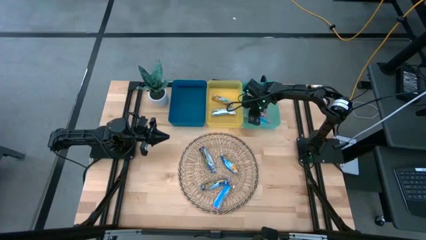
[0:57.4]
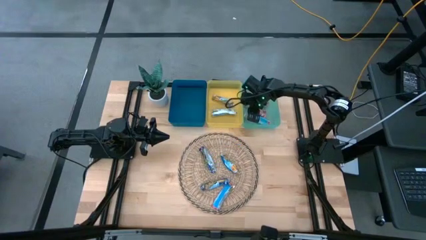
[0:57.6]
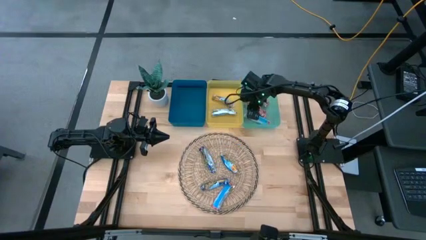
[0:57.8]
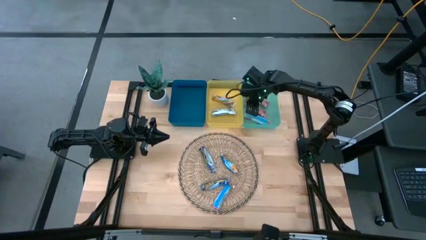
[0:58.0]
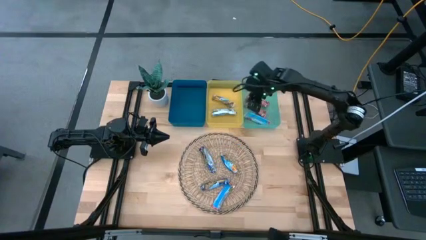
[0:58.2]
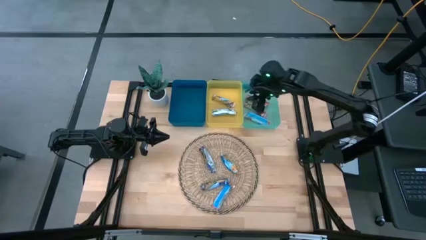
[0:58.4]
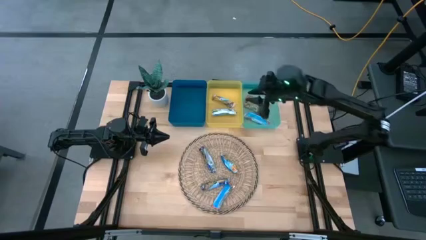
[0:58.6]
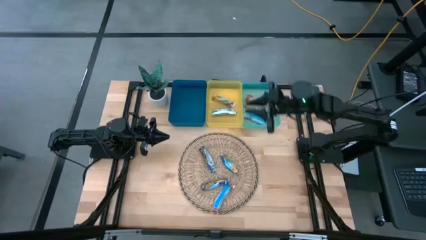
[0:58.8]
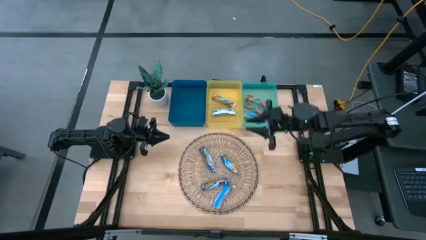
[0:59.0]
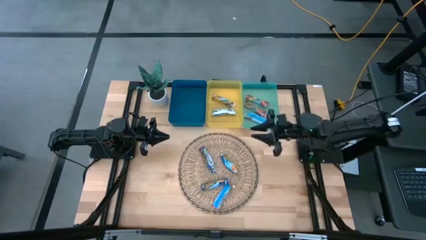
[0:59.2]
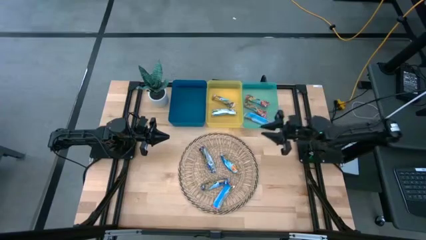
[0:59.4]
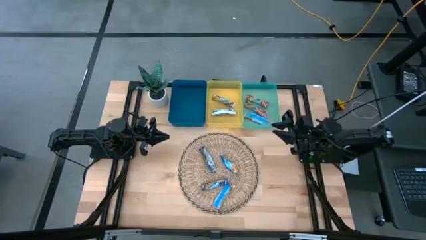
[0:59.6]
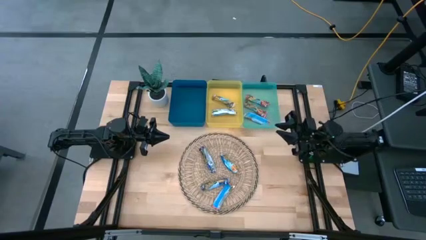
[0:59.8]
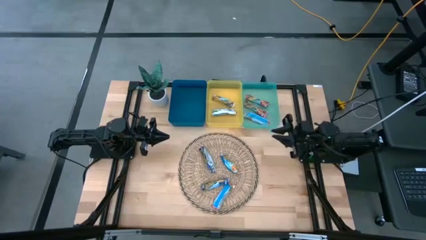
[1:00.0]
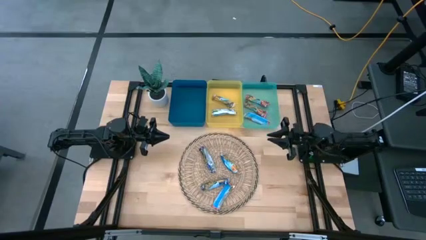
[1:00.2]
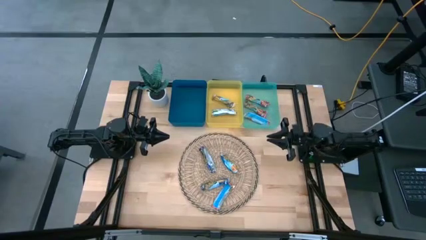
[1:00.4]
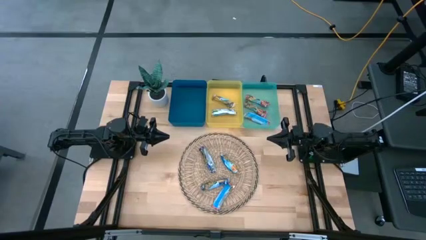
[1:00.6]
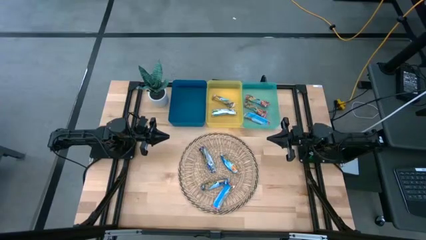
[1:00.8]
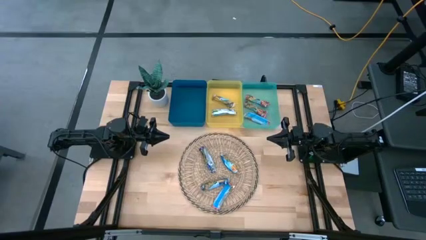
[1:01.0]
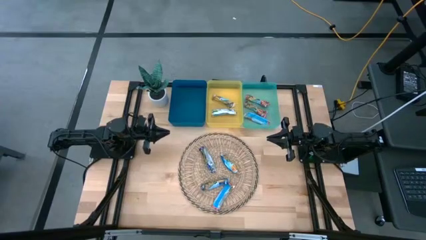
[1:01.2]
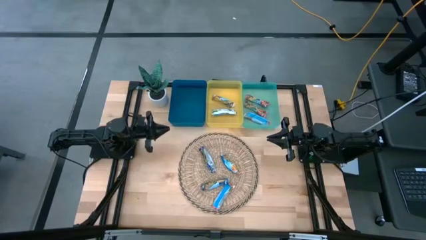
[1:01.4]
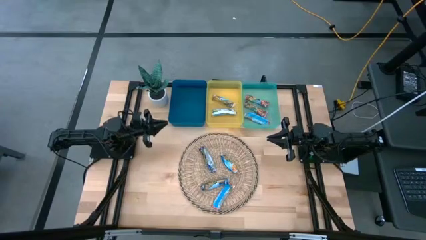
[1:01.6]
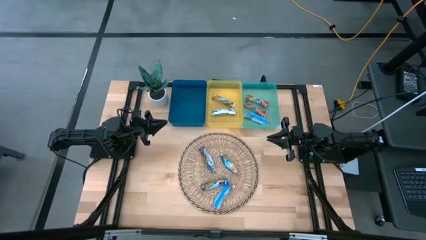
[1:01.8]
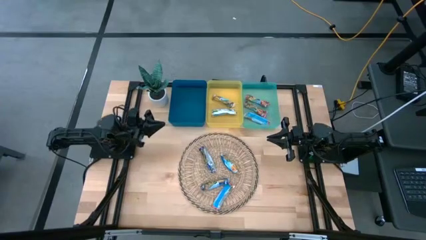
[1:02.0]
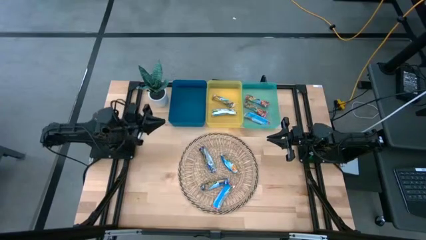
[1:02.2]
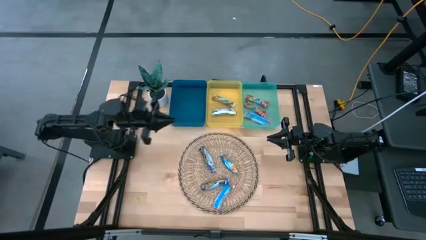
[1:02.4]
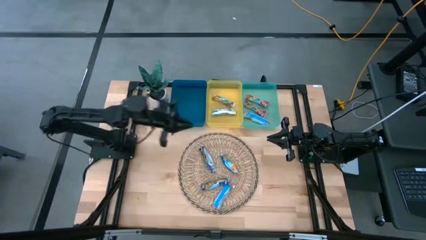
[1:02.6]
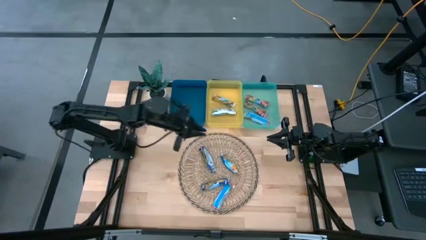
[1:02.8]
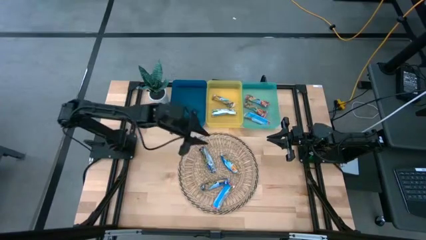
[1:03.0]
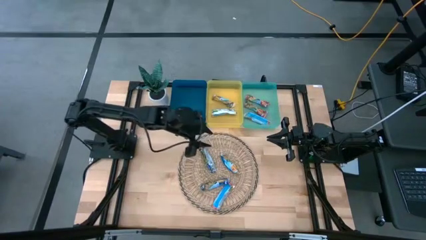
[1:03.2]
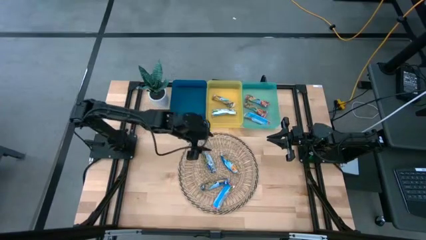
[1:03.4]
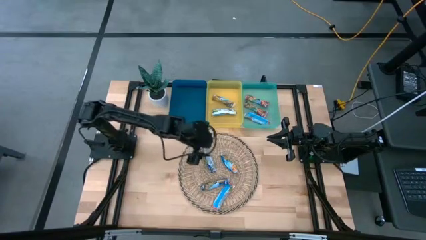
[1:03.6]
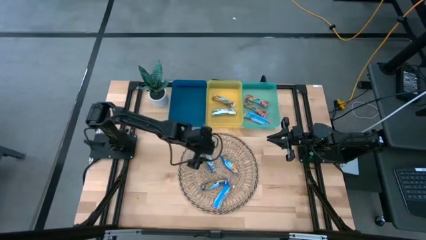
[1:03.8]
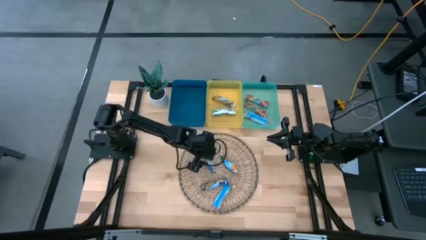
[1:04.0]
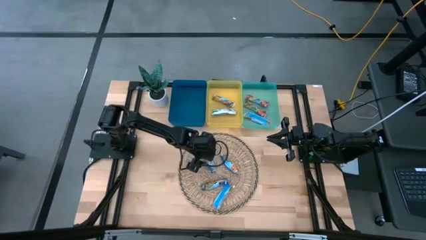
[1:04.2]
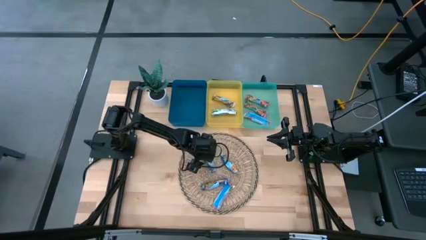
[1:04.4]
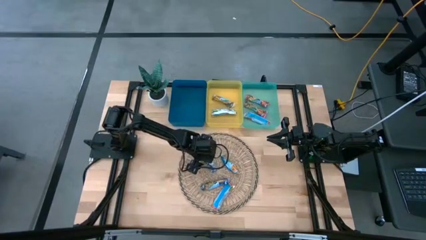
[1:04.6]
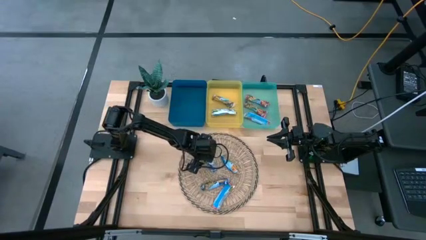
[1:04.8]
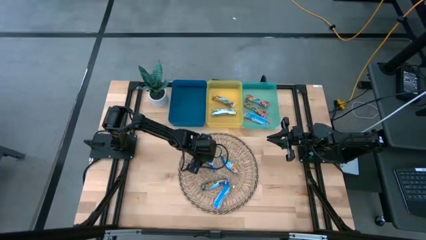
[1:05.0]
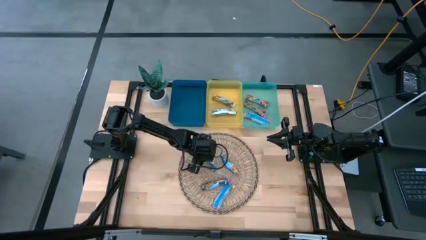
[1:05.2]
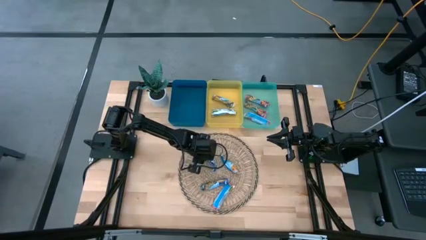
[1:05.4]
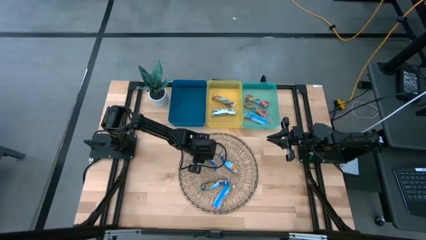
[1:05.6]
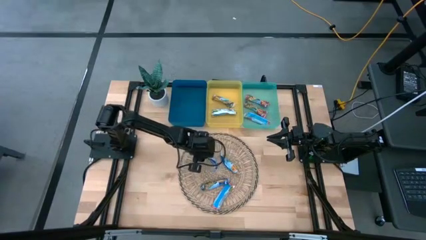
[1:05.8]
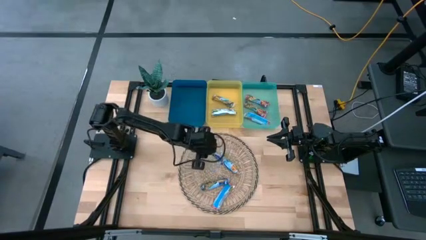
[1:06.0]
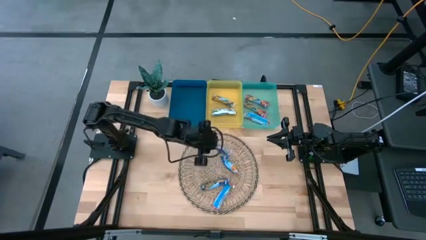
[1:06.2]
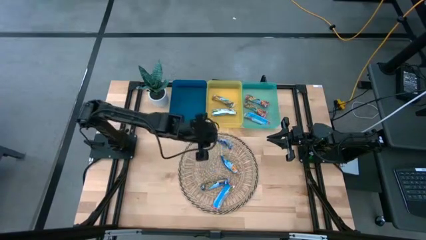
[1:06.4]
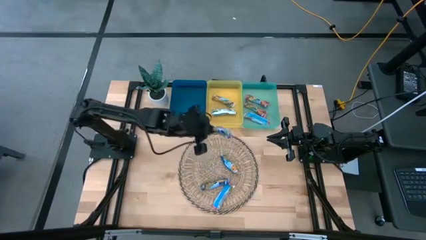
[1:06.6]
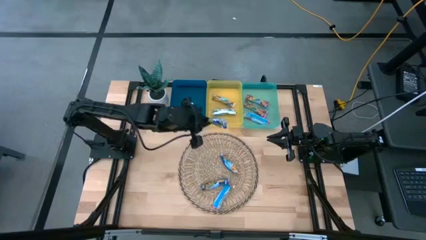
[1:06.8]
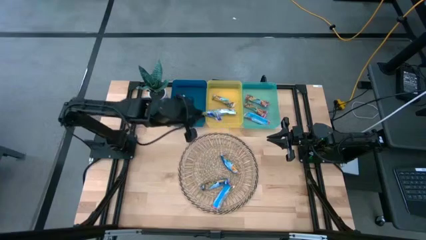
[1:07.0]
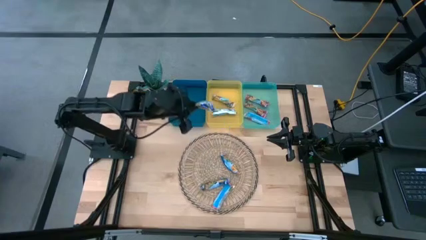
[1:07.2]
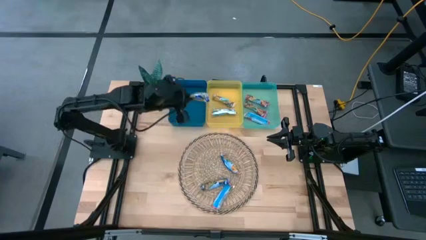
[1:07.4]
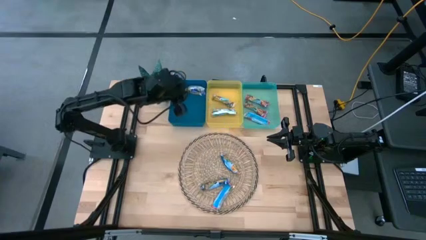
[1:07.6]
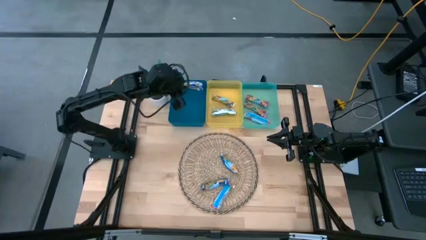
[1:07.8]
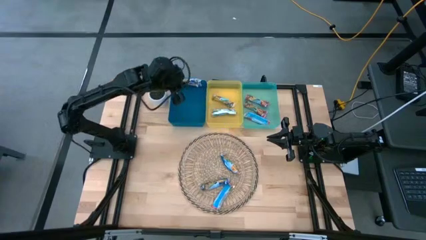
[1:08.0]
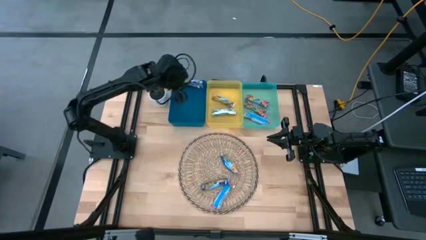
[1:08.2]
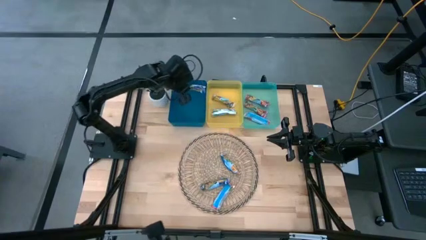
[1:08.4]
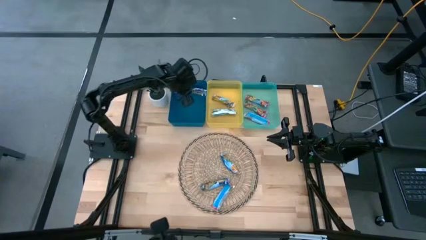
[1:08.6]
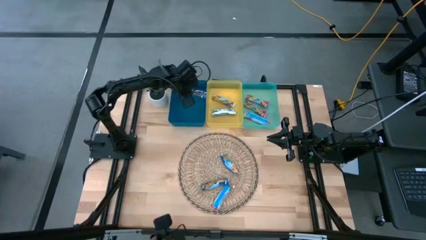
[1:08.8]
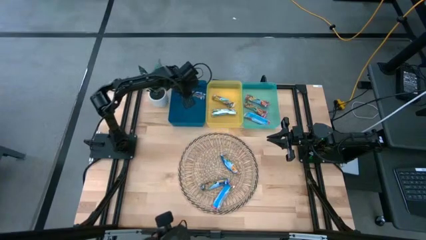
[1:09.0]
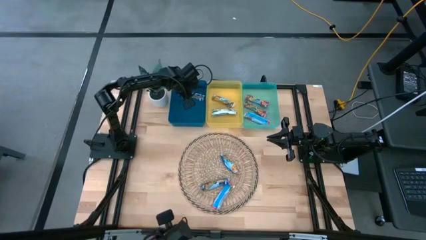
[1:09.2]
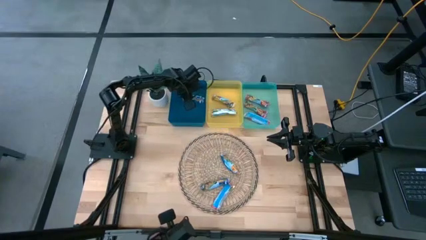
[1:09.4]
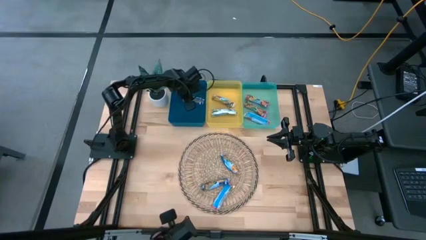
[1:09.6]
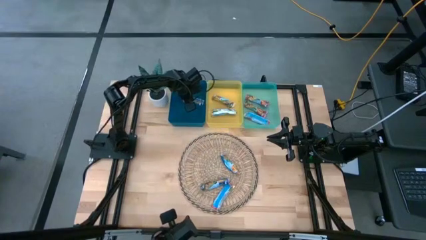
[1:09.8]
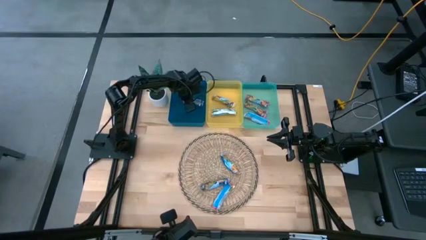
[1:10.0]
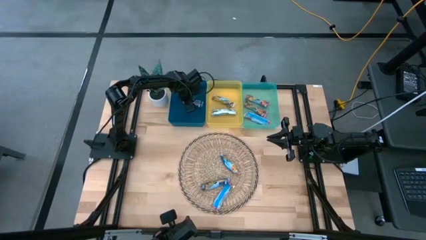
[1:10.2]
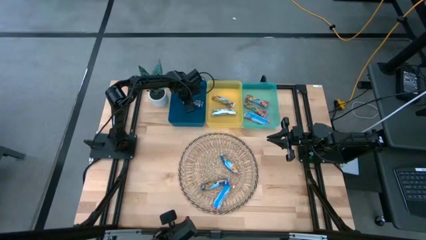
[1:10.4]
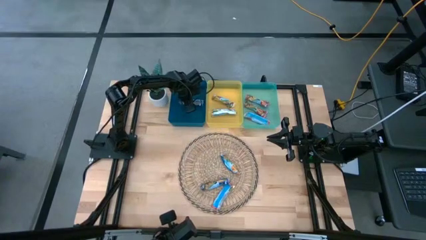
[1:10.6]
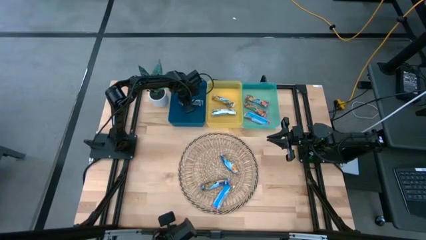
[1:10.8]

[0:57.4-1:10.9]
Task: Pick and place Granola Bars by type
Put the blue granola bar into the blue bin

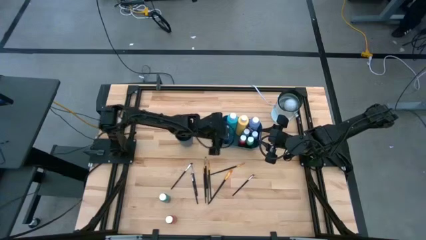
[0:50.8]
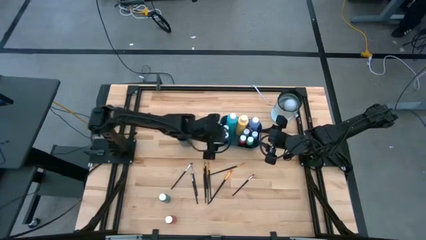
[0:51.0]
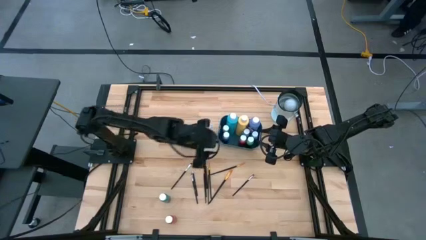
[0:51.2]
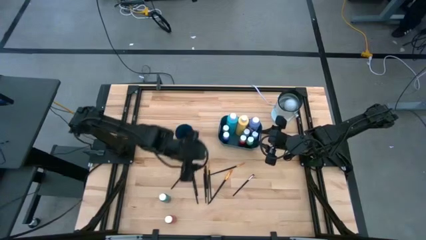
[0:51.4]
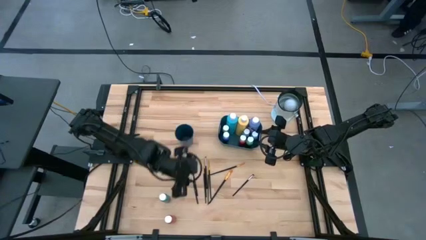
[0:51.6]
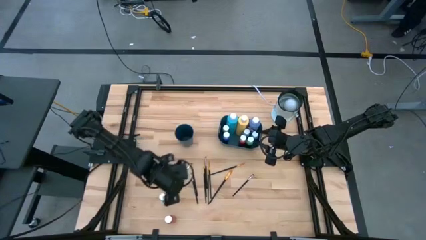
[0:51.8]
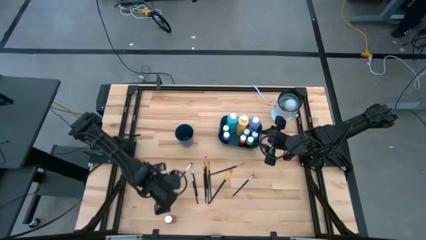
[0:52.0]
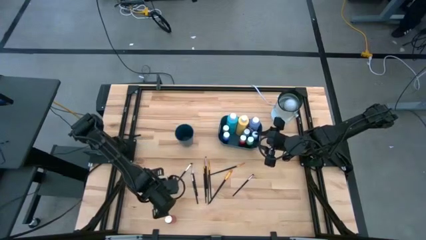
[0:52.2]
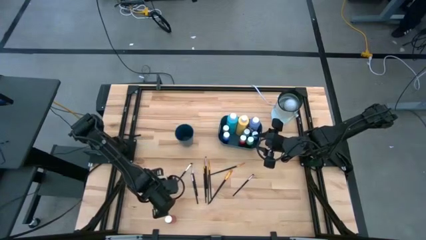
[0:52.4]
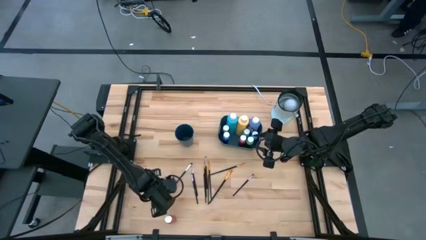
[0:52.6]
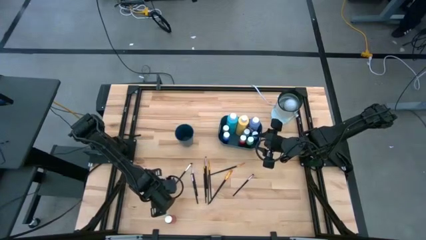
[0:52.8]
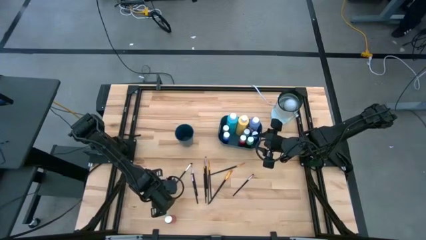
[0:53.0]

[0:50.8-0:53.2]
Task: Pick & Place Paint Supplies
Put the small light green paint bottle into the blue bin
